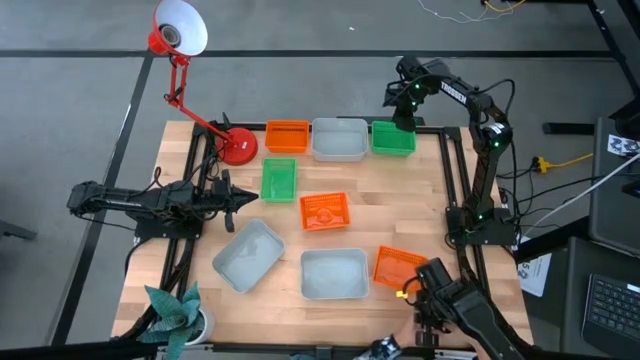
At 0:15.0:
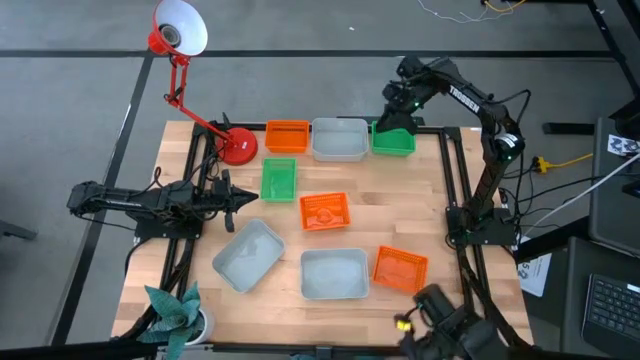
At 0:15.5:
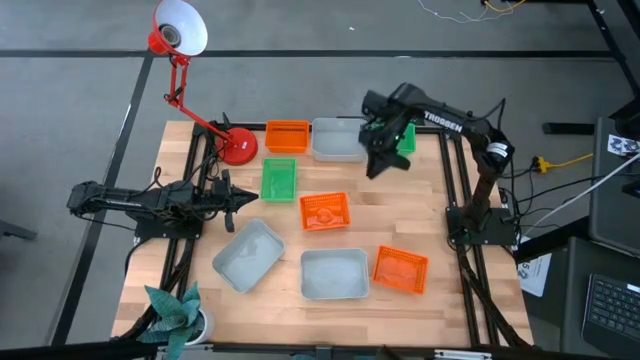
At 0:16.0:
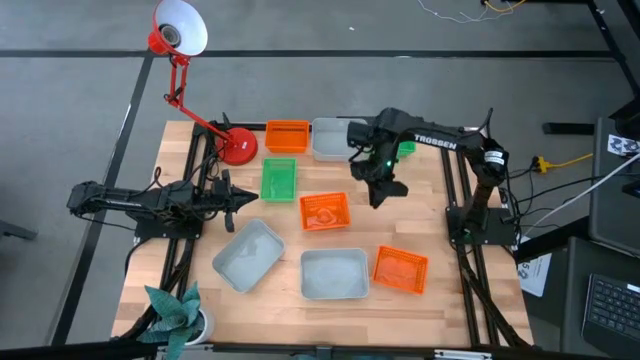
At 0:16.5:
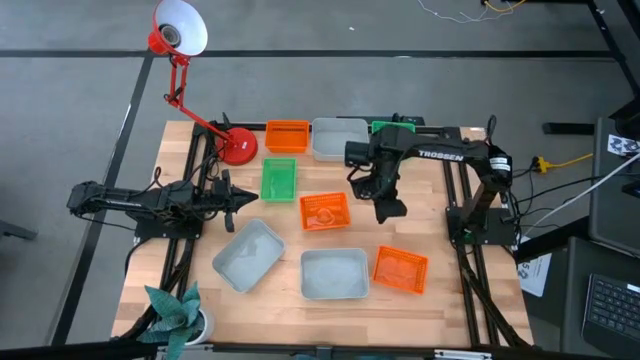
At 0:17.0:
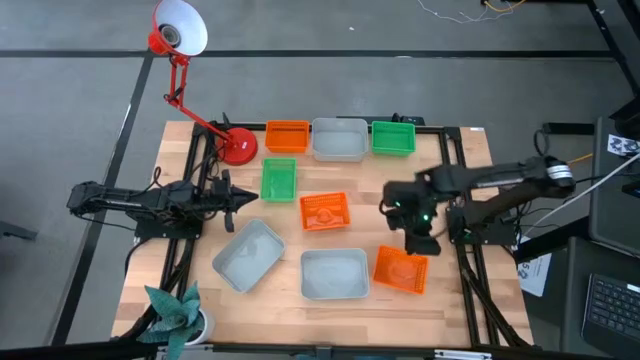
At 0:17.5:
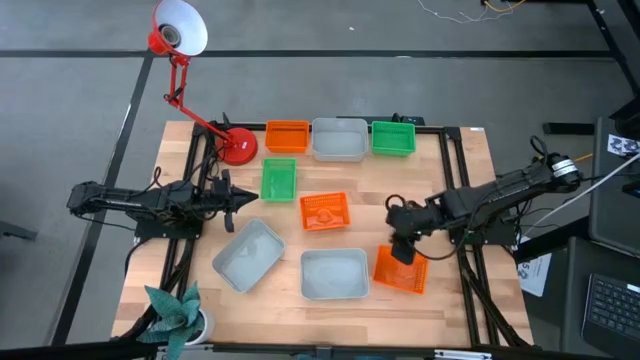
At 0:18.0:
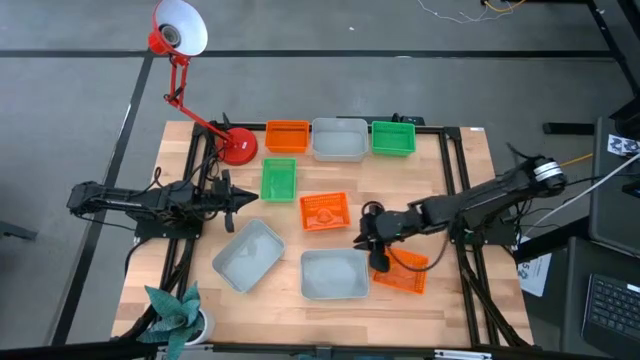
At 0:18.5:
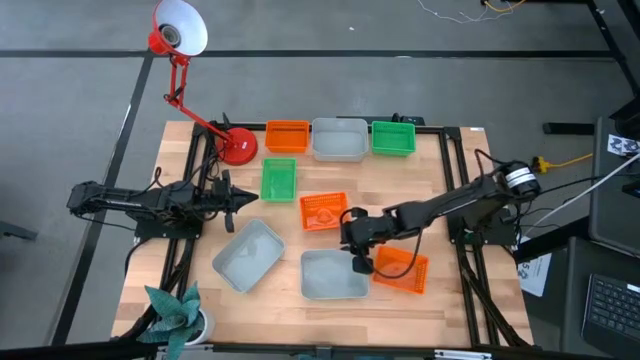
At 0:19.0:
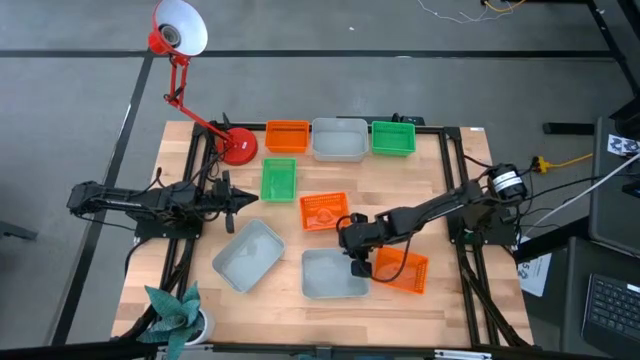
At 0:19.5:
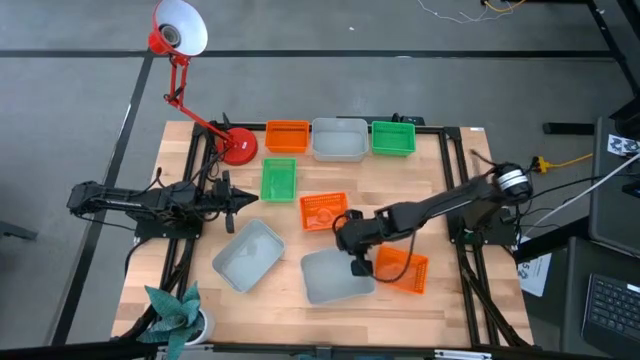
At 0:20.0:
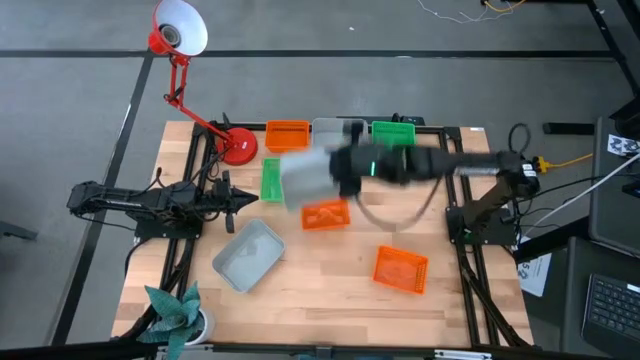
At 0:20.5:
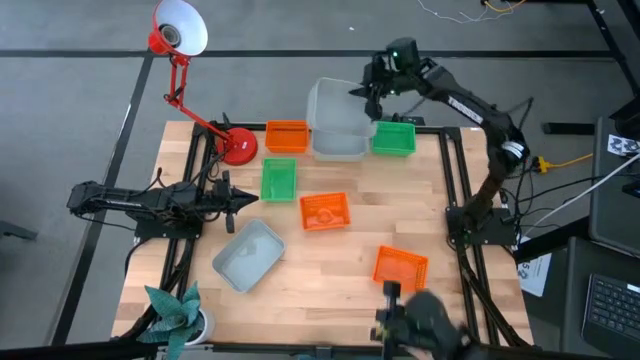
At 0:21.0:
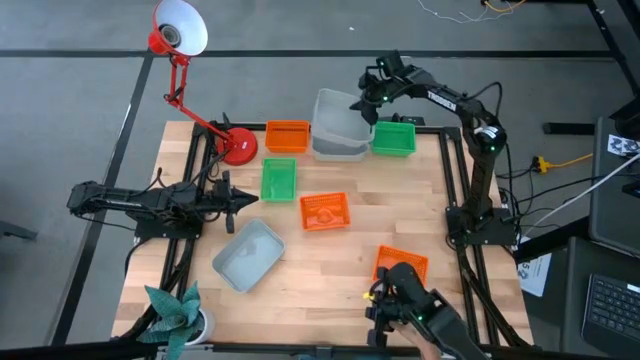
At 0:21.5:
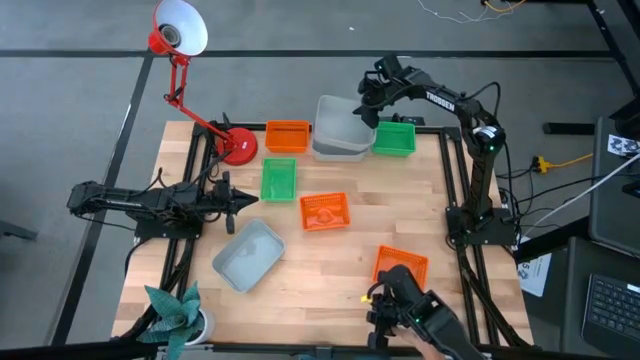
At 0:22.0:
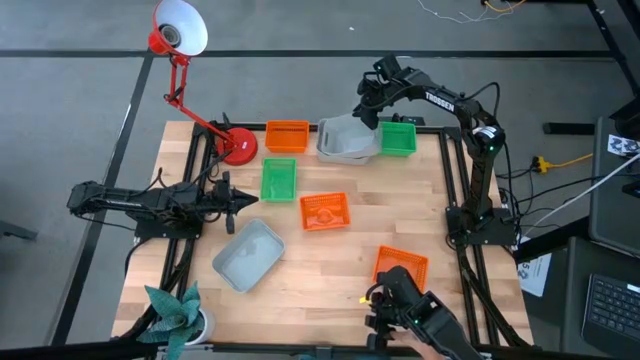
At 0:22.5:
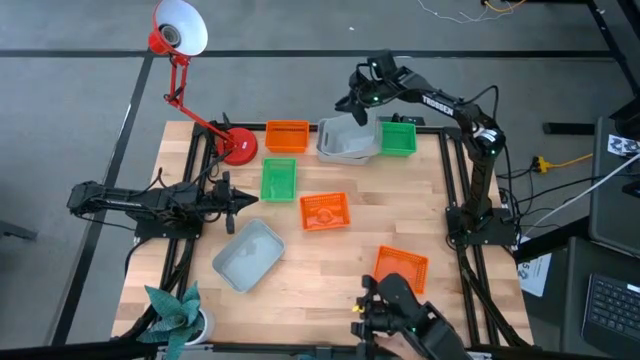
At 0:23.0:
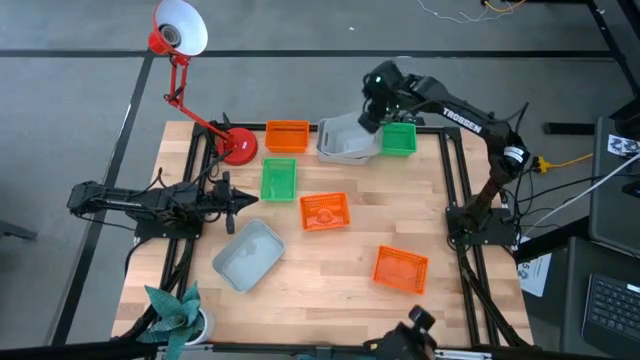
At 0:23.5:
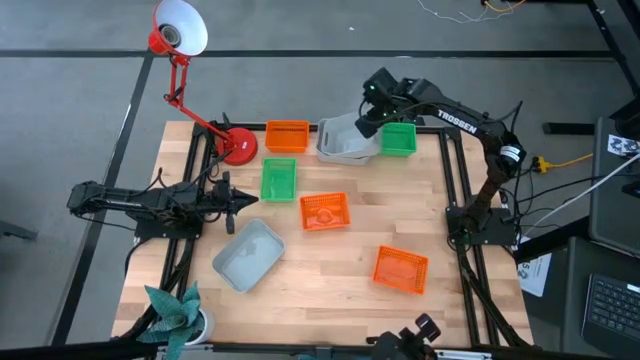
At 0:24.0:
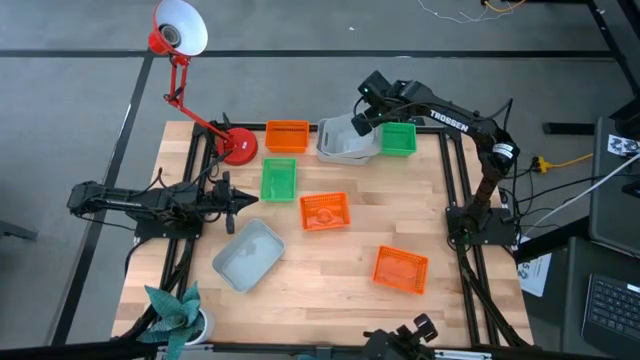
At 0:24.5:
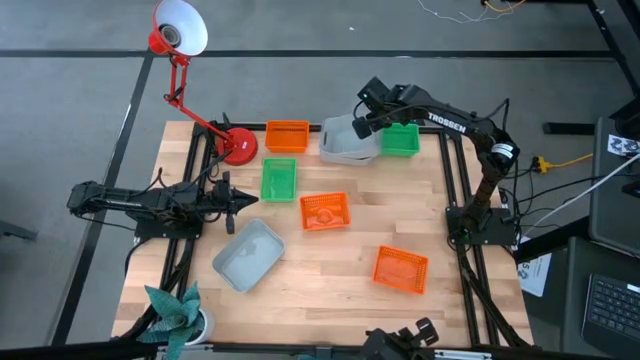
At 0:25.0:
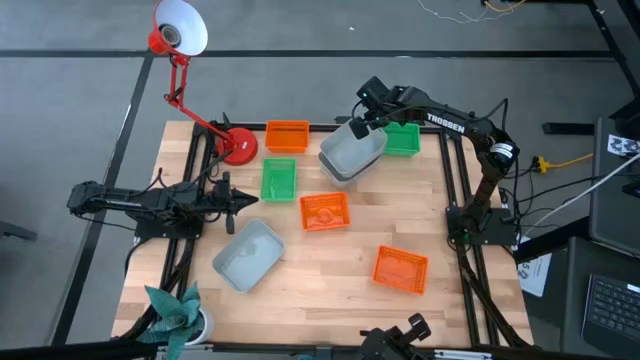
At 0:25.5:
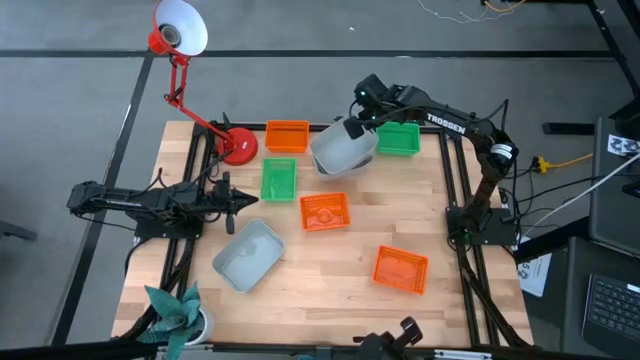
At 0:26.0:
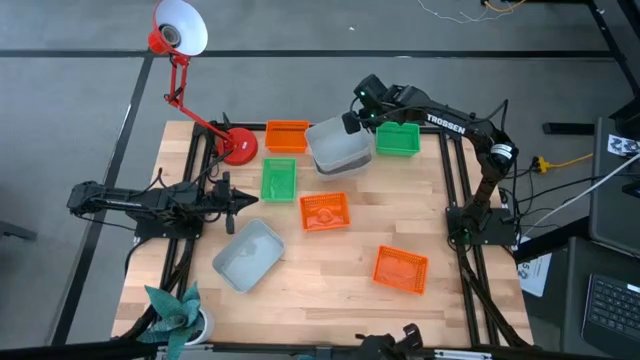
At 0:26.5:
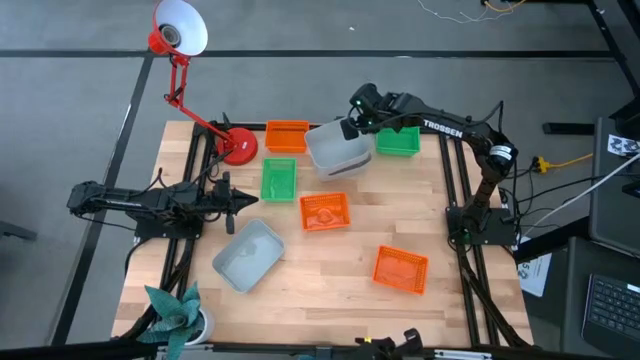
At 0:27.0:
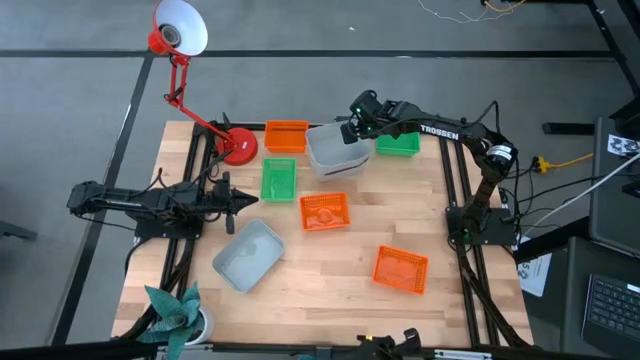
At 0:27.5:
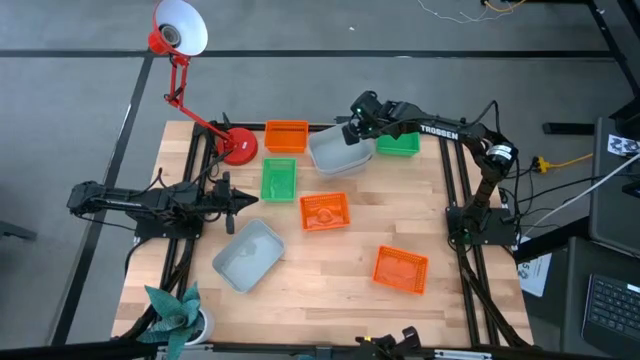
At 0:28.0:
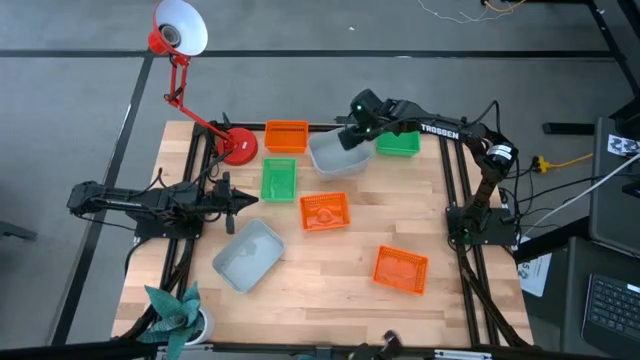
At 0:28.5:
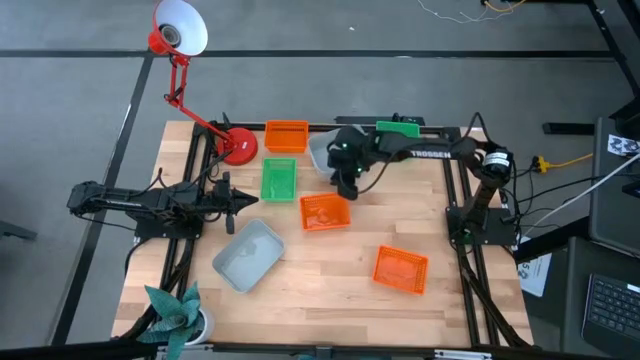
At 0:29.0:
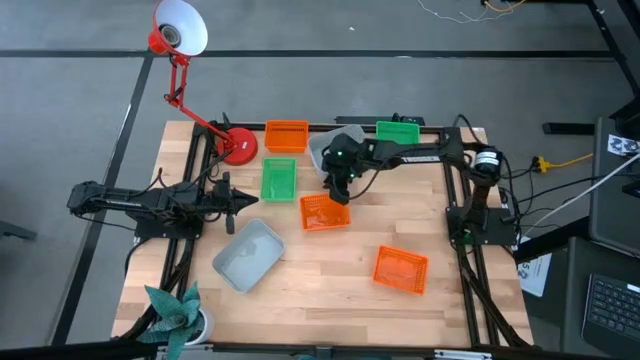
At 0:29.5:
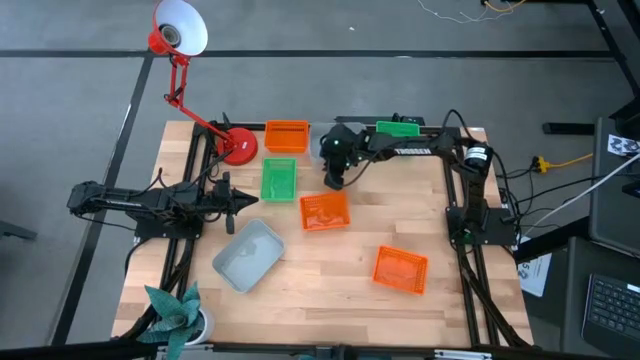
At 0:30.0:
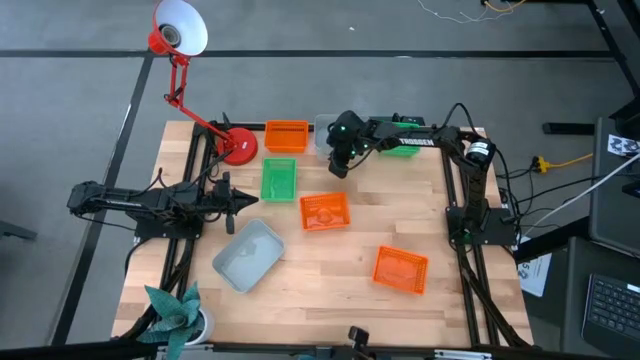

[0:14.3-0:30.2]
Stack the bottom right gray bin on the top gray bin

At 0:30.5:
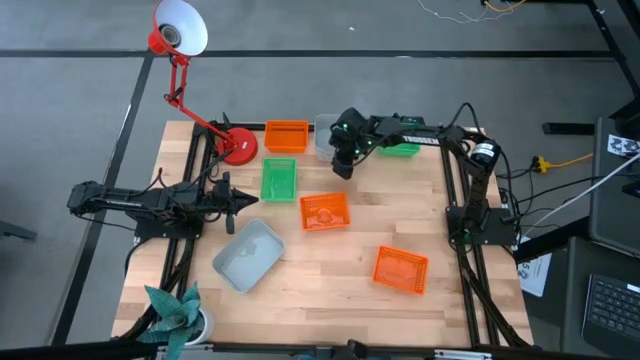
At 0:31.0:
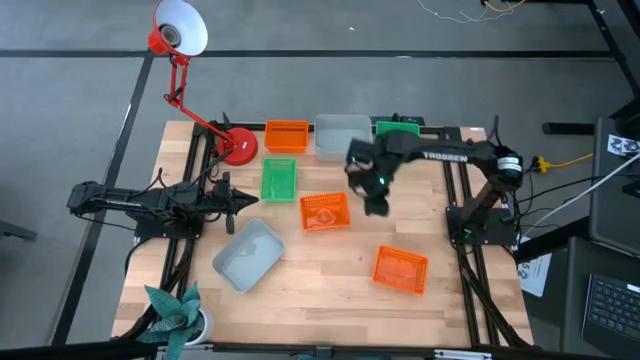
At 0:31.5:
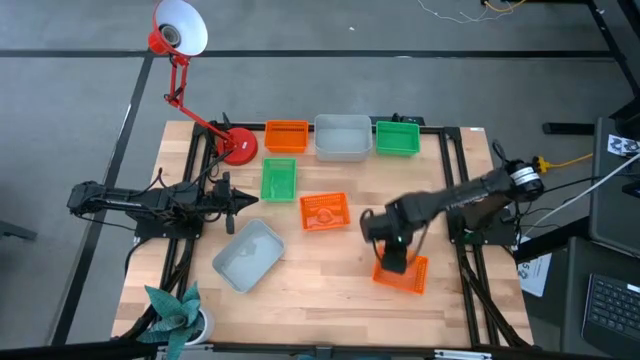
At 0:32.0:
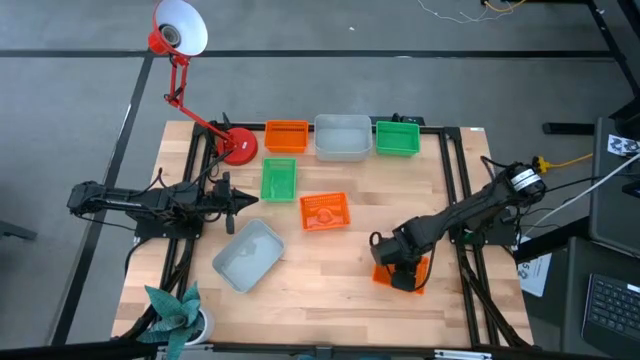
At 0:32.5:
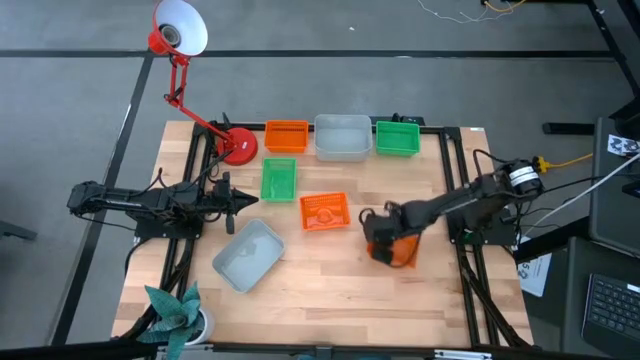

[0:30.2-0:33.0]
Move the bottom orange bin to the center of the table
